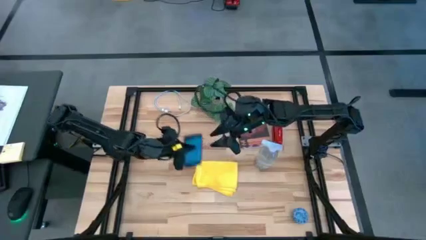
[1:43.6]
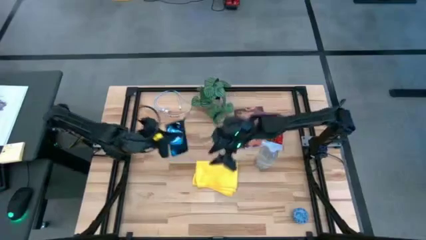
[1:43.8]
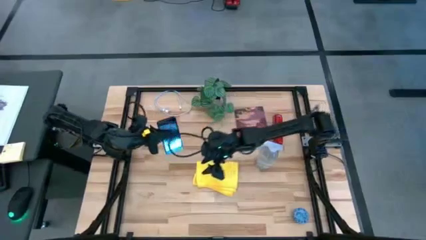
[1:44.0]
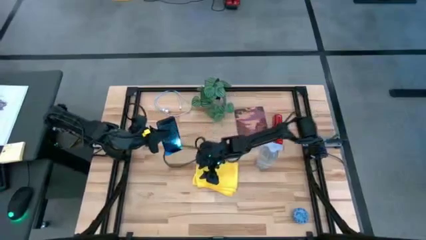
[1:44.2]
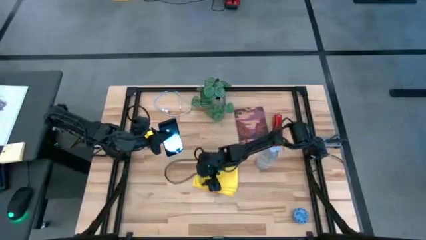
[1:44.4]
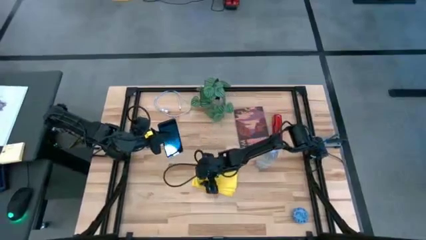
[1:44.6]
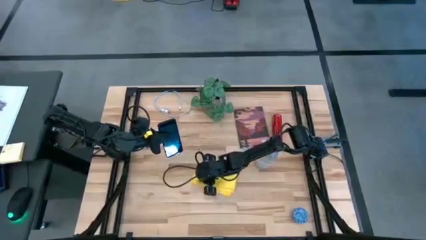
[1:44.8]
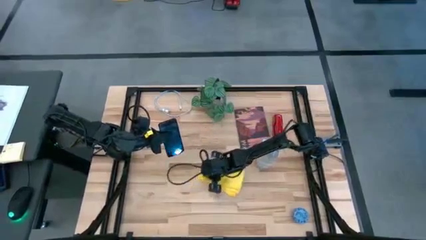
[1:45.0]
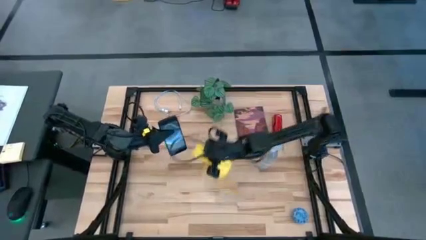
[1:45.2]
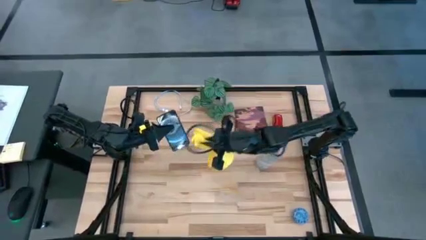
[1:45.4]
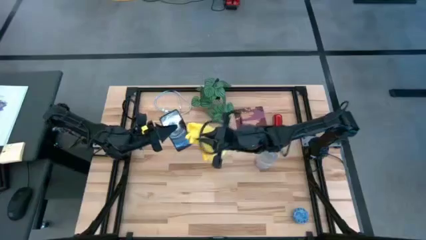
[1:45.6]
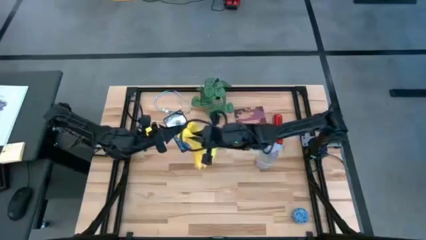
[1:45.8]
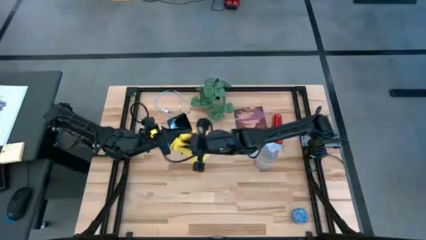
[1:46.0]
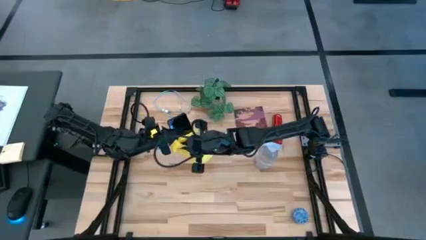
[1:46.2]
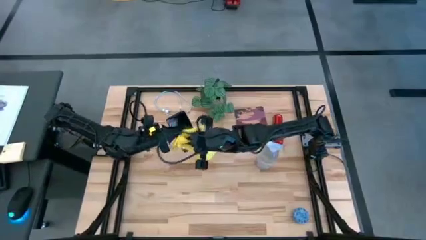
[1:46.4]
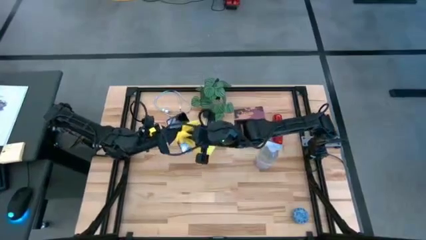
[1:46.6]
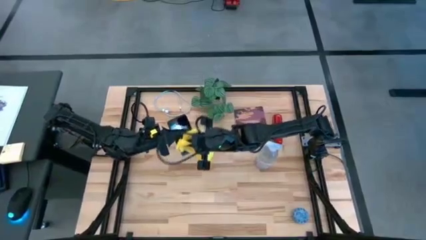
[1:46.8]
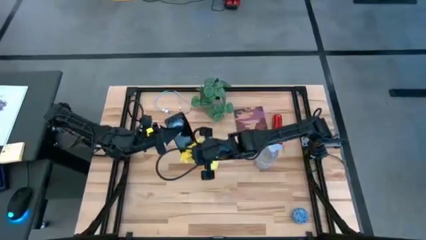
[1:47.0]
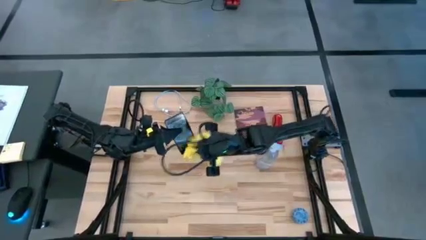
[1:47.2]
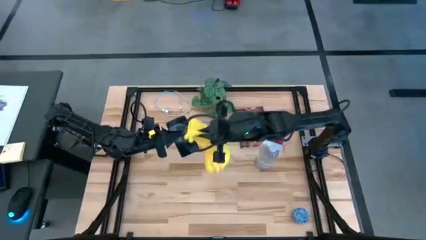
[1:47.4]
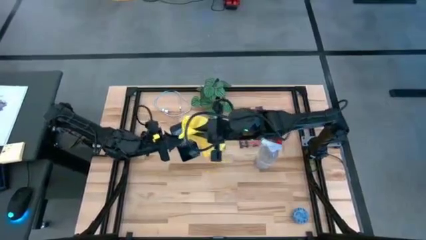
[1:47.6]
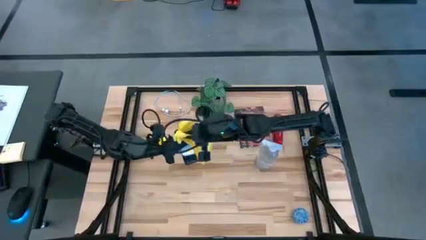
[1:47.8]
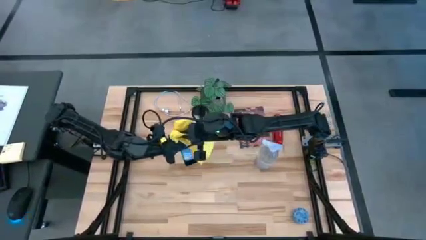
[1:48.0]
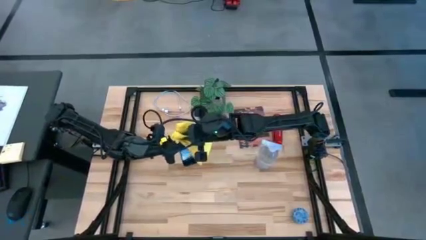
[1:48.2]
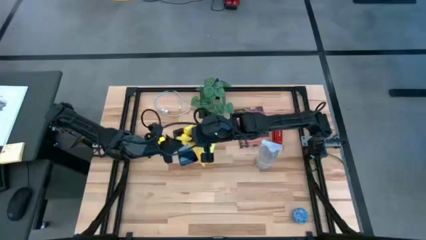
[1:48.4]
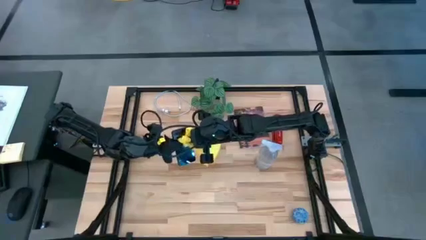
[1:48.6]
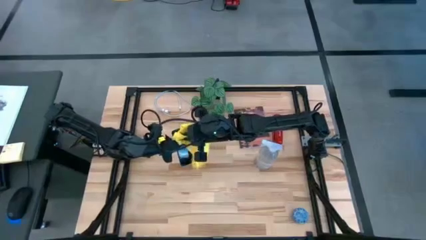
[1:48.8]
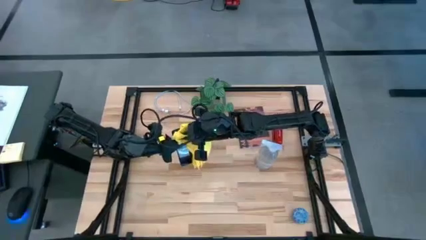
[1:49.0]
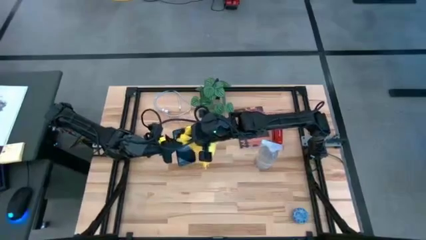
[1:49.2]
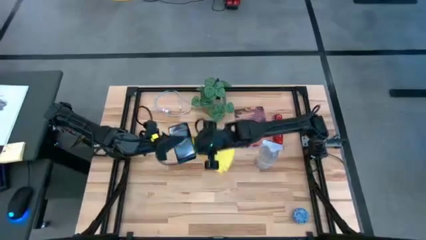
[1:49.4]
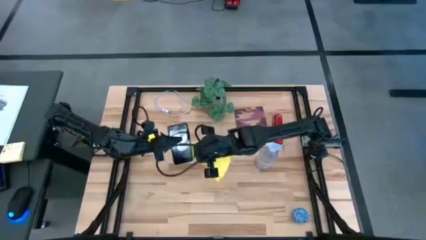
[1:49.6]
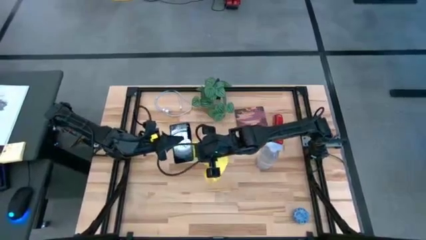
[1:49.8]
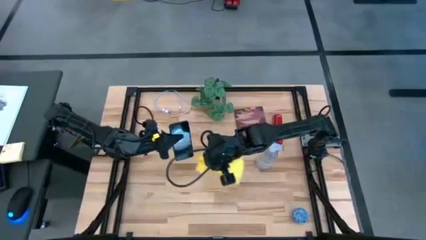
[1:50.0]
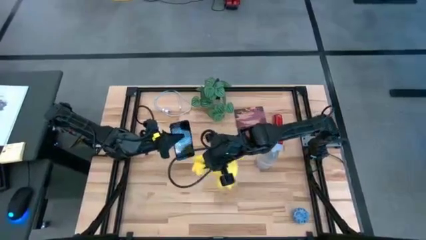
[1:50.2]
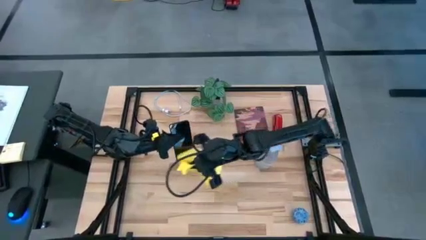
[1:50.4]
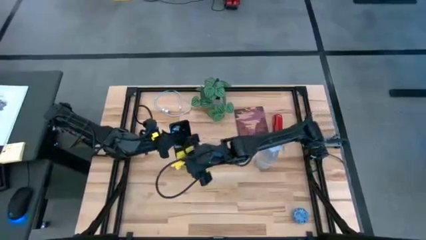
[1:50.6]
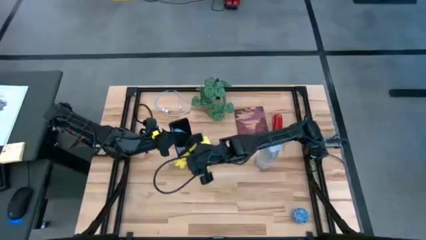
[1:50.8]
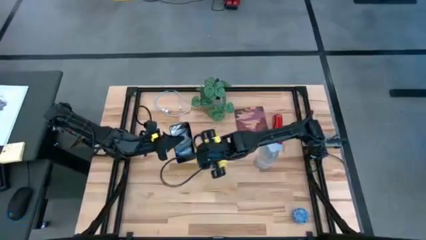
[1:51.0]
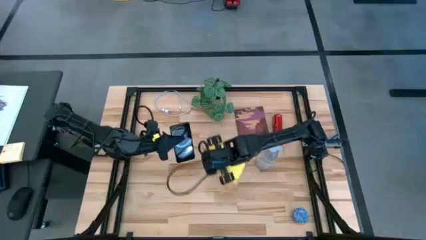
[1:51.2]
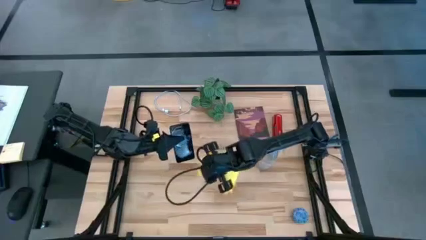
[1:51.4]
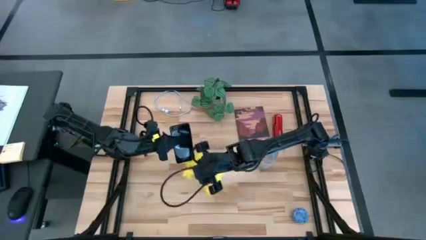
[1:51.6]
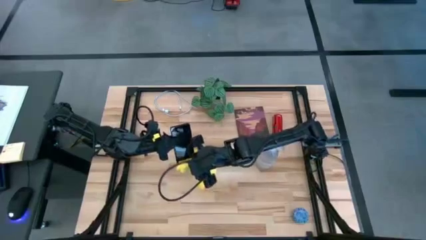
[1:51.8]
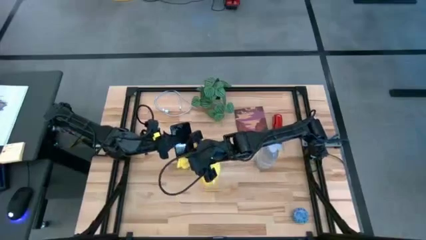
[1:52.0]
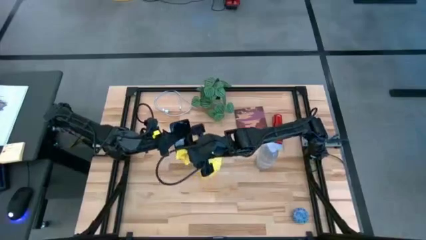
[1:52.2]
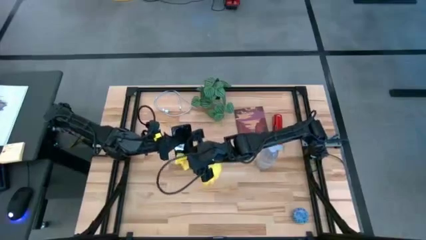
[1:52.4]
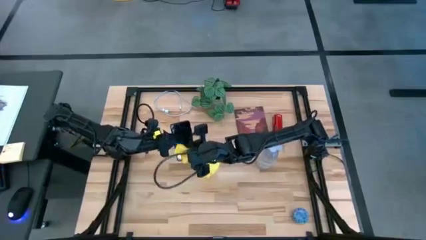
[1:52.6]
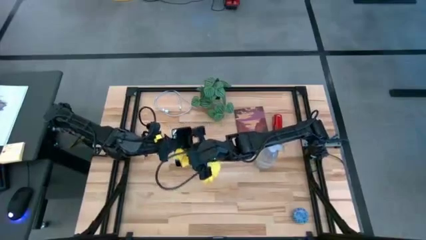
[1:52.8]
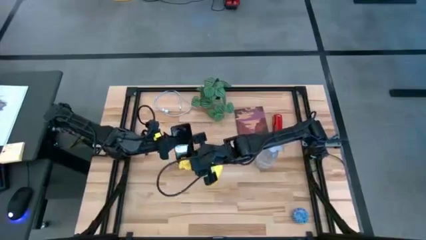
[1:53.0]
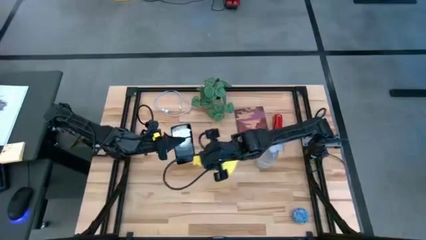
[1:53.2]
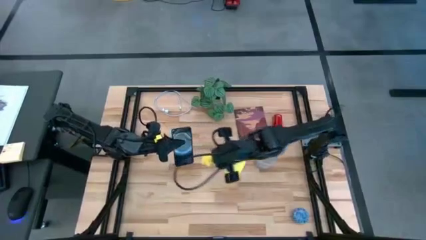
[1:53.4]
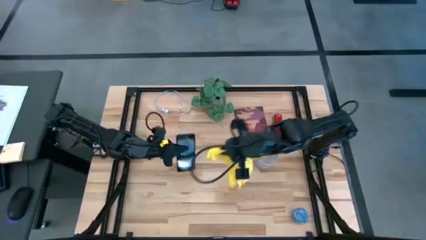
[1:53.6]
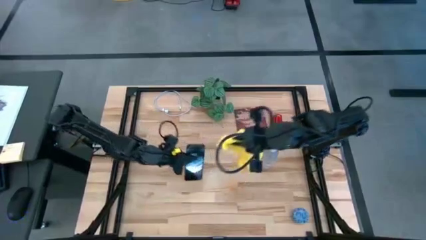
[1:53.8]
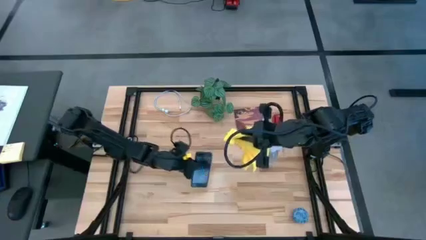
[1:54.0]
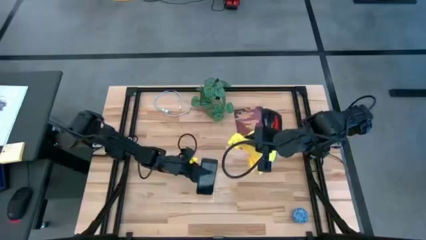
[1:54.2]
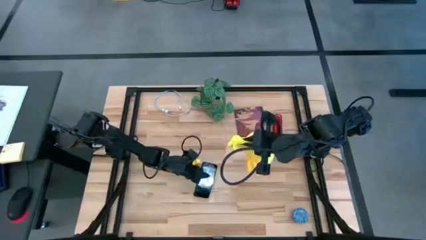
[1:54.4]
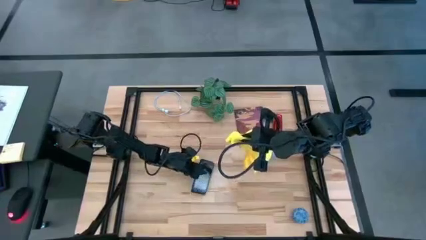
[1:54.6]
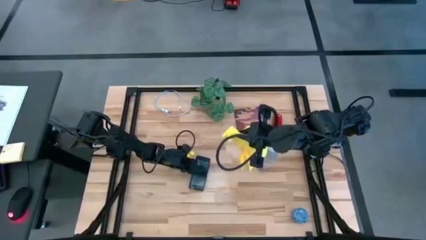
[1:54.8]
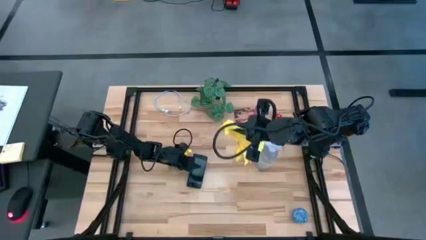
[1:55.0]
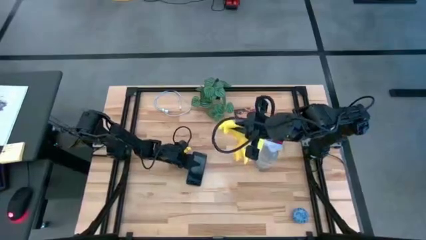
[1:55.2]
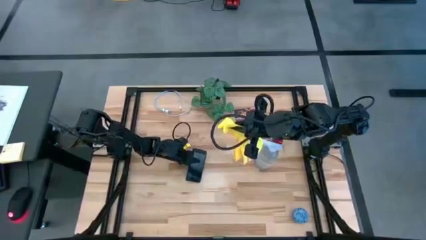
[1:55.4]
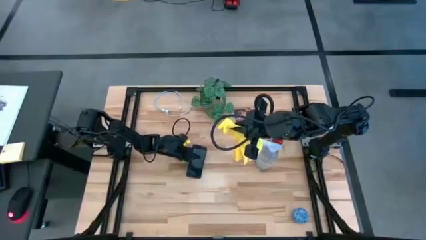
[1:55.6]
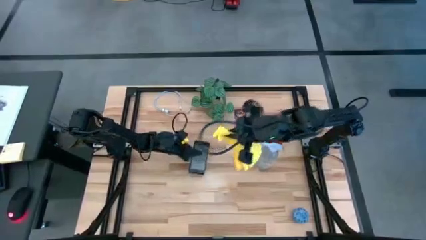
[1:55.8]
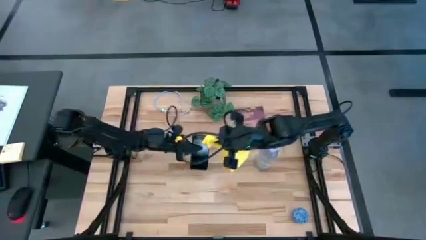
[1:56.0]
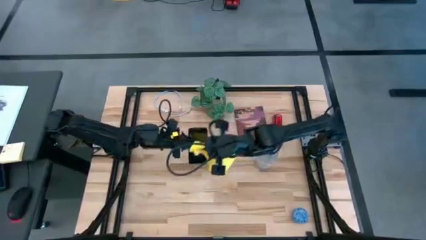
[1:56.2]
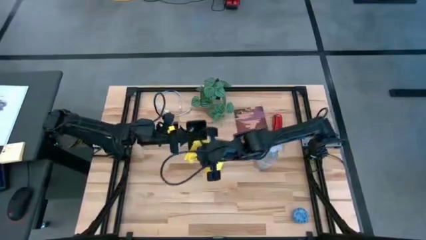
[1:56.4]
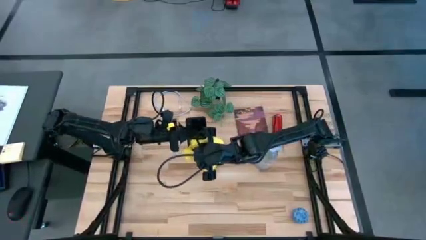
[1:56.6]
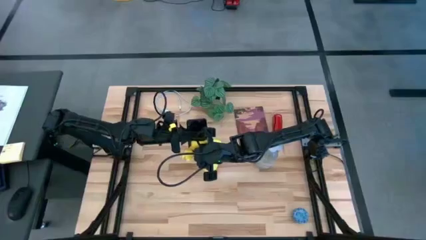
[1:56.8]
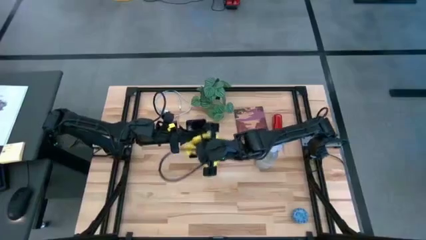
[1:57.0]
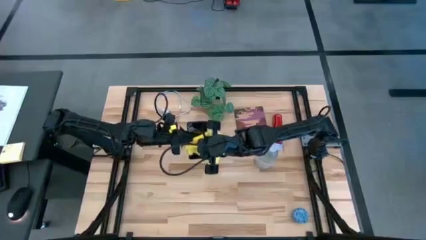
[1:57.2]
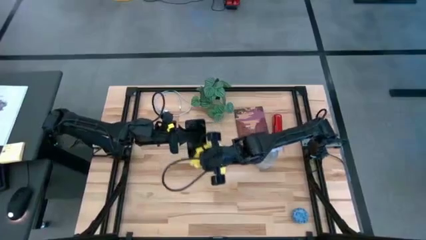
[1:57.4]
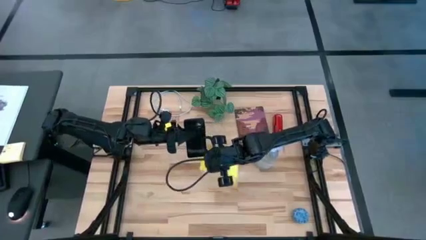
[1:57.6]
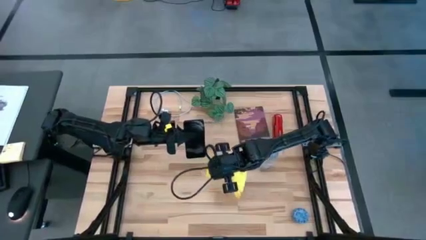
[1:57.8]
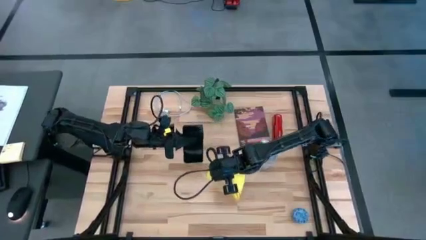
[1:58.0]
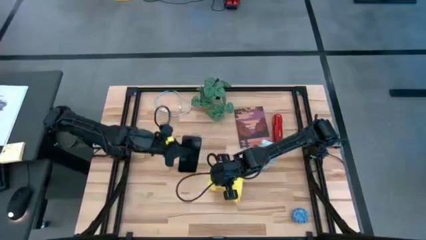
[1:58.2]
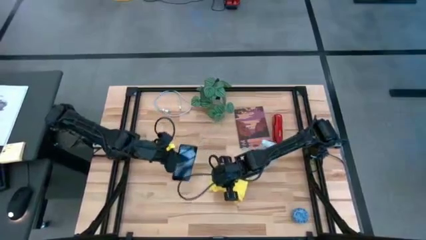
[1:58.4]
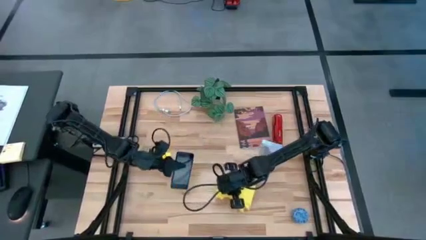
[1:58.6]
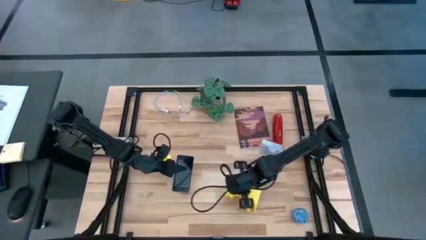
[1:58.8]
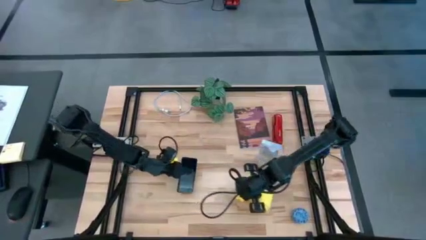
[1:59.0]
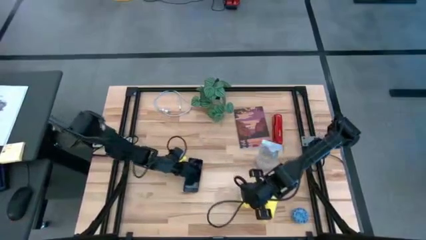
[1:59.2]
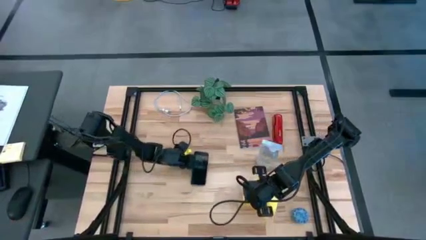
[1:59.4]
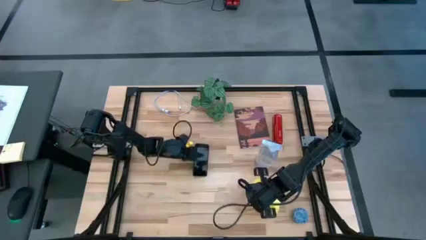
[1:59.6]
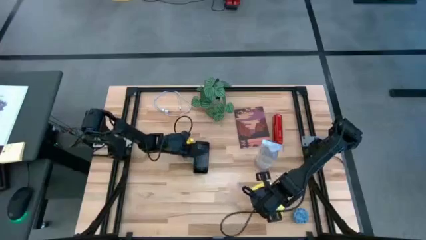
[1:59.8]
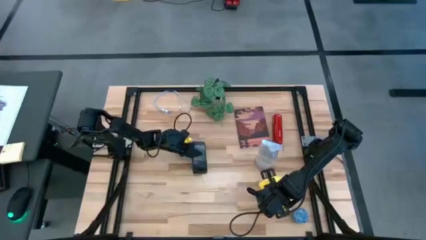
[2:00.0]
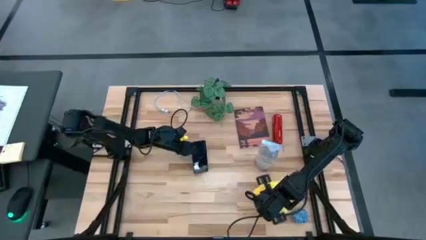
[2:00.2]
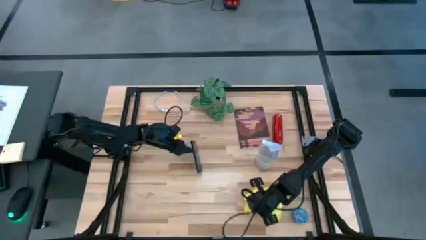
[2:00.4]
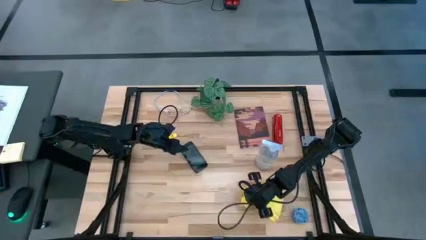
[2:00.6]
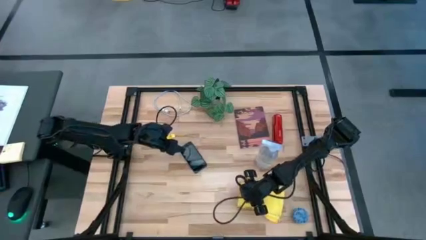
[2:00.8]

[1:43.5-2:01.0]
Task: Apply microfiber cloth
Wipe the front of the black cellphone with the yellow microfiber cloth
